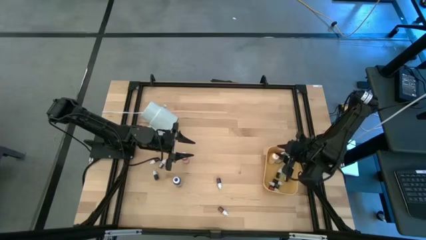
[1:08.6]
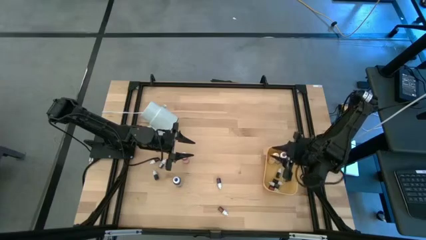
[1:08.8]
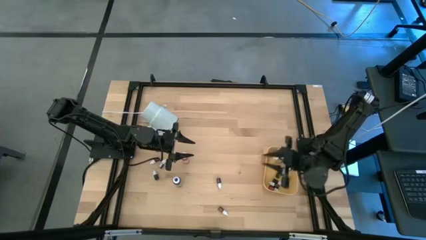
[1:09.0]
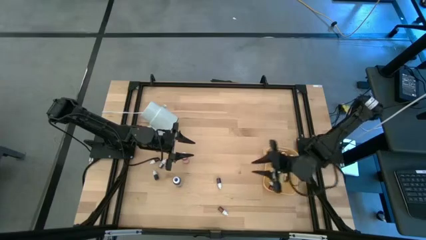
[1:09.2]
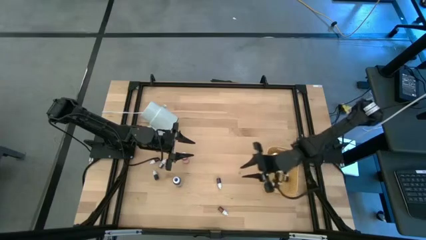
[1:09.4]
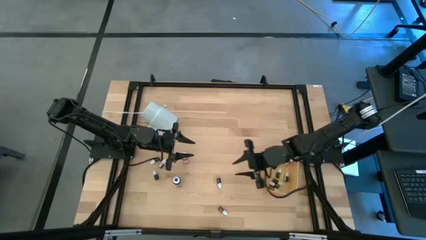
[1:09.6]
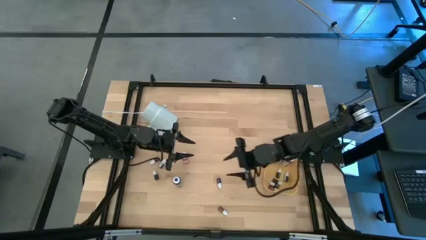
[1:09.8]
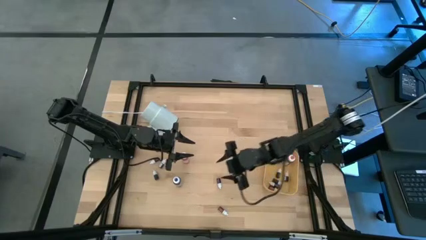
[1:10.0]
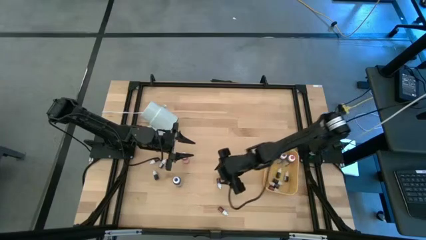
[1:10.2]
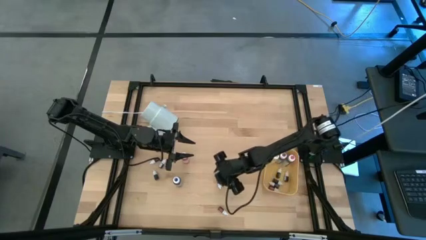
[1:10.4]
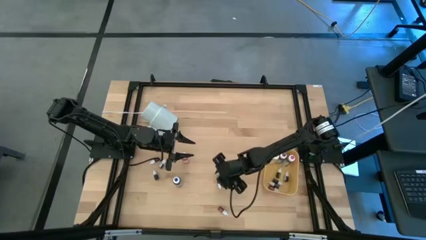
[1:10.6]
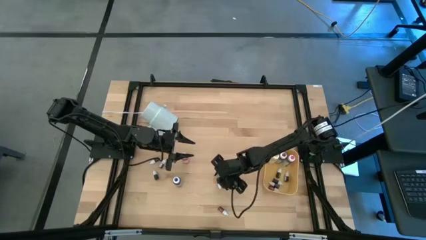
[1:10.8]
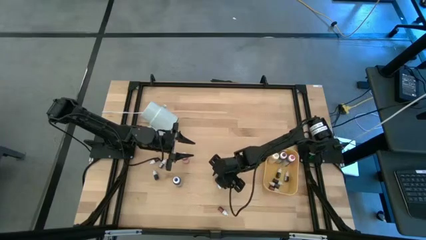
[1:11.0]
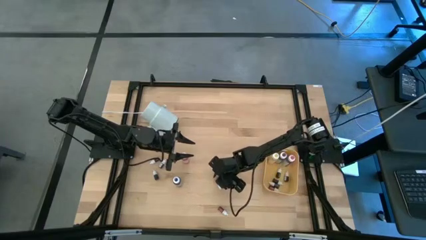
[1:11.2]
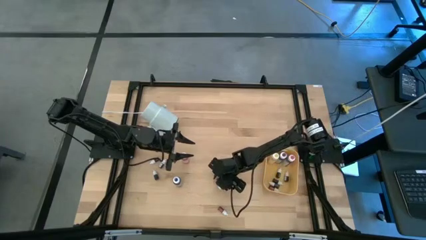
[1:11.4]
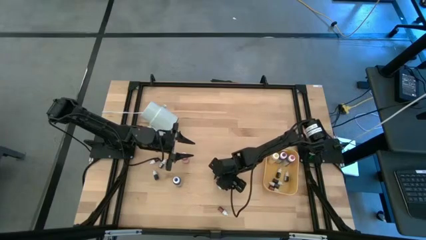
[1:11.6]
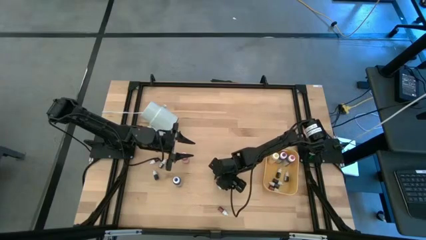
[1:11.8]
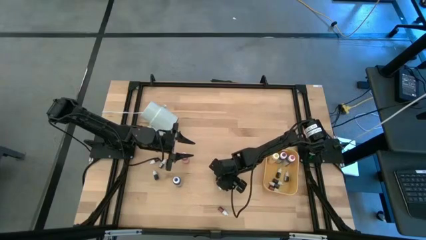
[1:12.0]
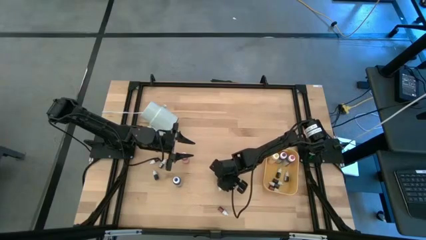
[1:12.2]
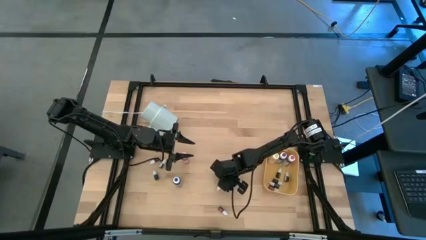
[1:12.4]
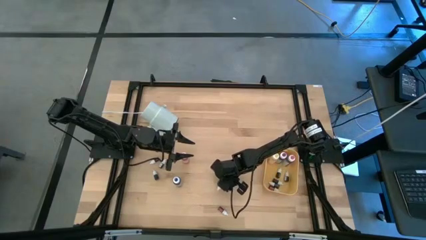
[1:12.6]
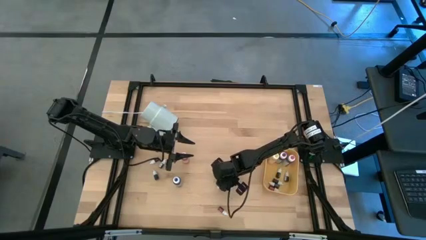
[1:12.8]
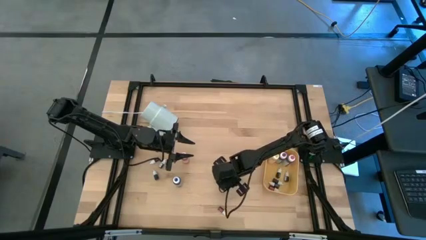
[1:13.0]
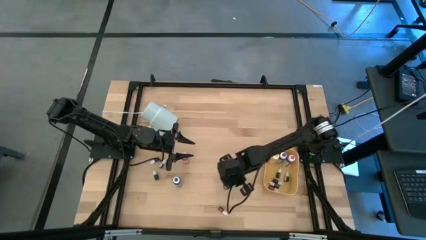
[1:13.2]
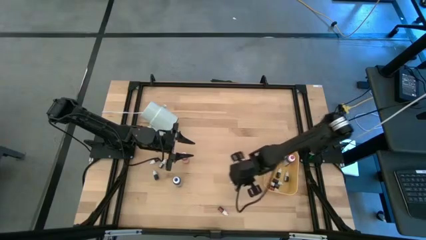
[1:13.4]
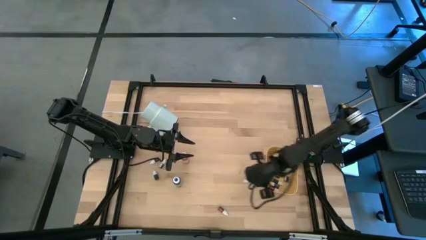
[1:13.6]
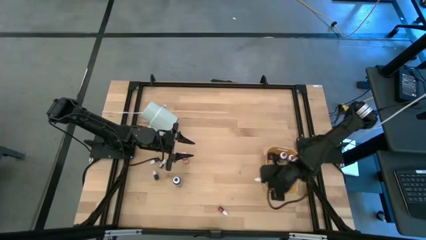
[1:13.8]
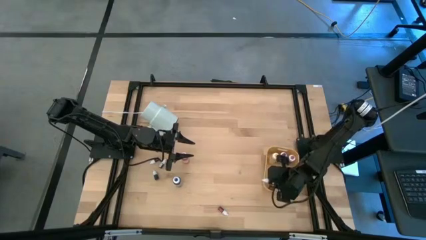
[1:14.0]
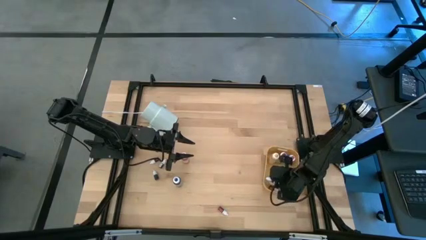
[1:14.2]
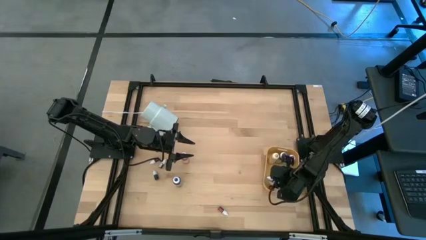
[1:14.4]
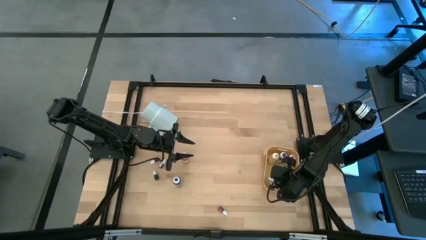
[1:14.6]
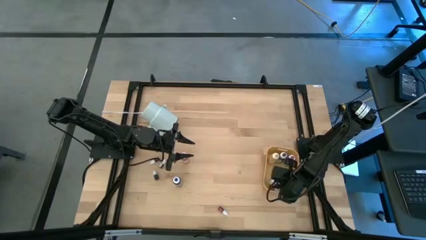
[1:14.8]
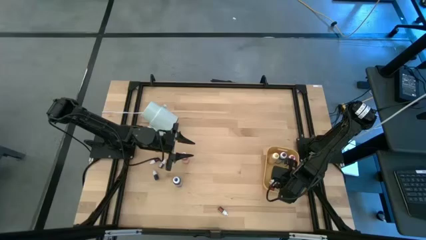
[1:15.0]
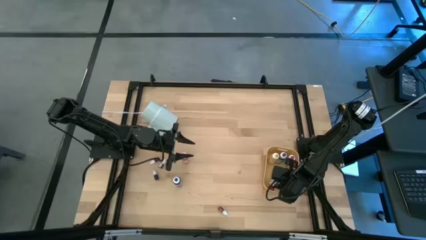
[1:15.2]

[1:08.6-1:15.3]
Task: Pick & Place food coloring
Put the small purple food coloring bottle into the yellow bin

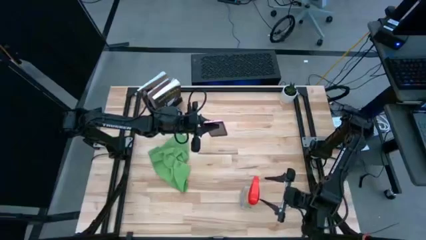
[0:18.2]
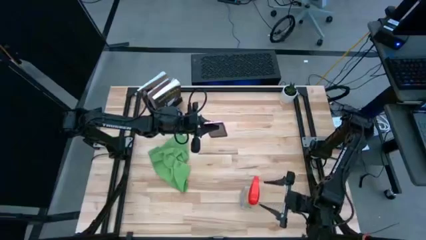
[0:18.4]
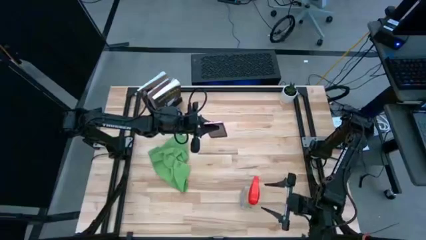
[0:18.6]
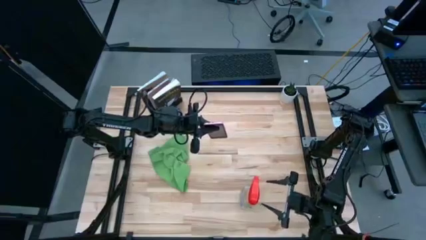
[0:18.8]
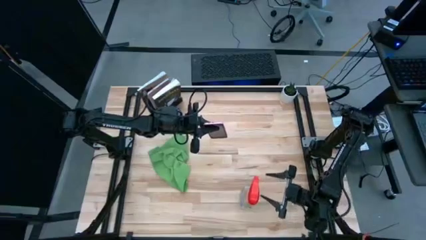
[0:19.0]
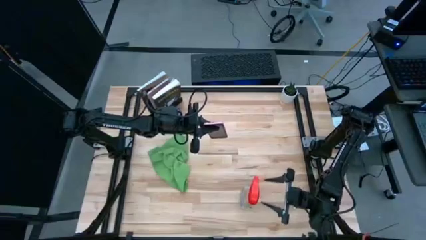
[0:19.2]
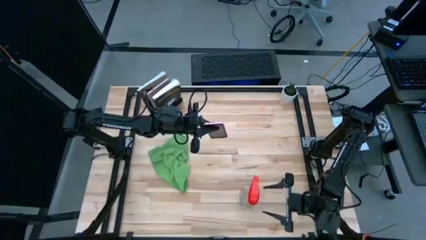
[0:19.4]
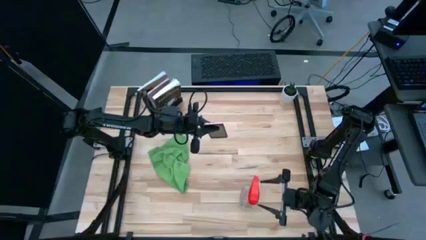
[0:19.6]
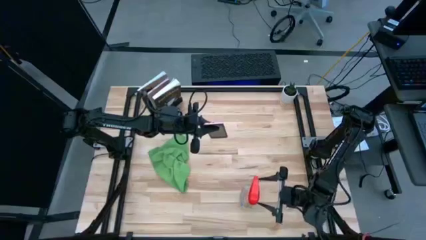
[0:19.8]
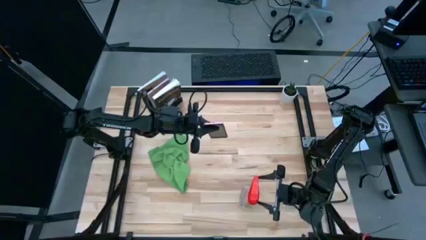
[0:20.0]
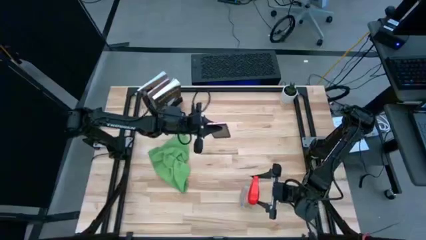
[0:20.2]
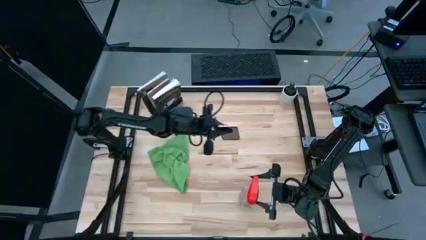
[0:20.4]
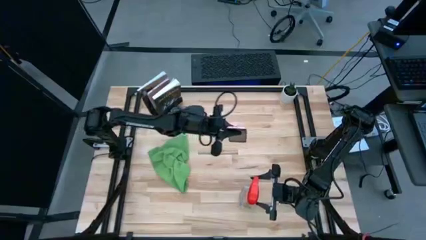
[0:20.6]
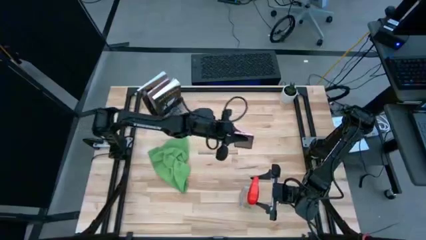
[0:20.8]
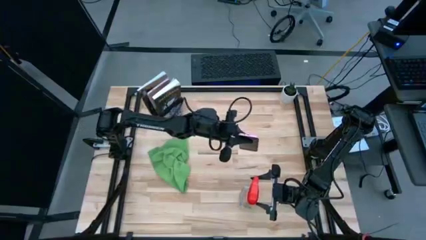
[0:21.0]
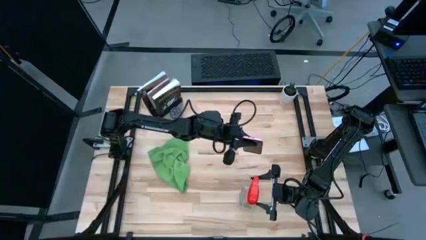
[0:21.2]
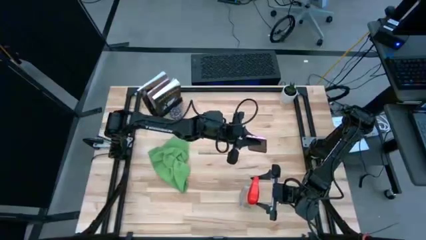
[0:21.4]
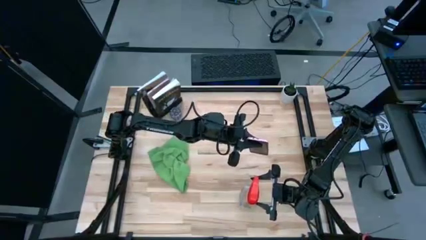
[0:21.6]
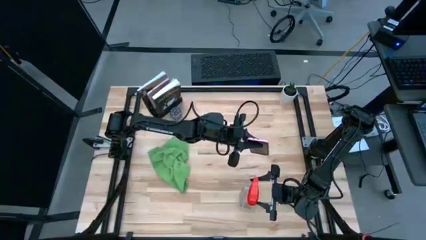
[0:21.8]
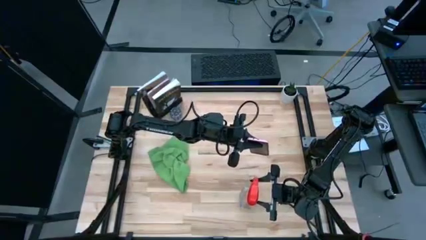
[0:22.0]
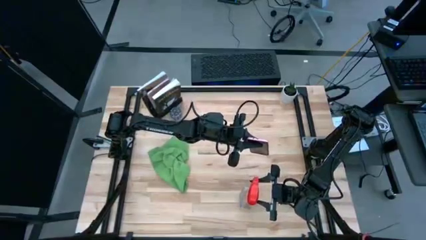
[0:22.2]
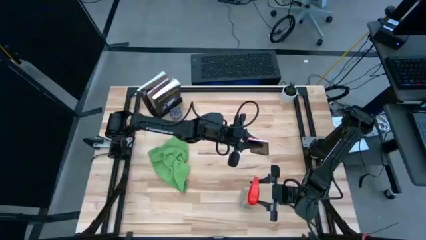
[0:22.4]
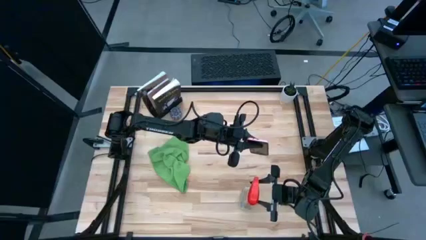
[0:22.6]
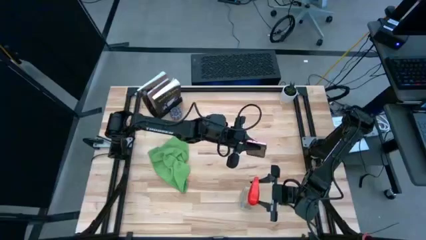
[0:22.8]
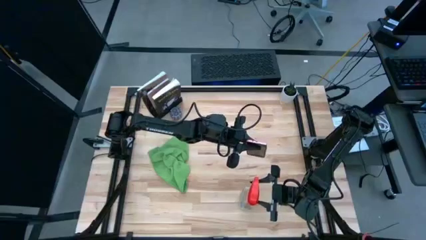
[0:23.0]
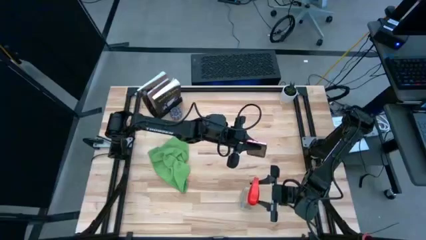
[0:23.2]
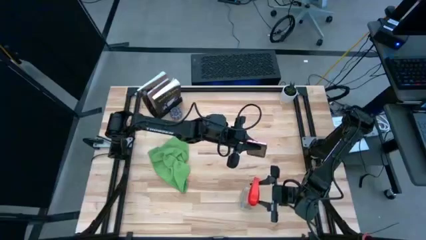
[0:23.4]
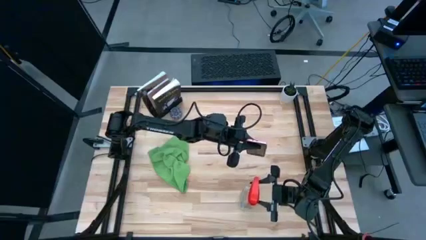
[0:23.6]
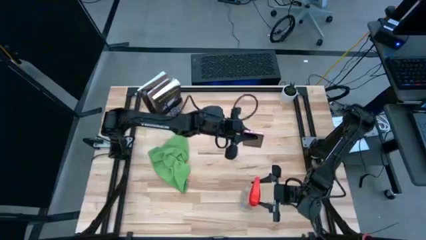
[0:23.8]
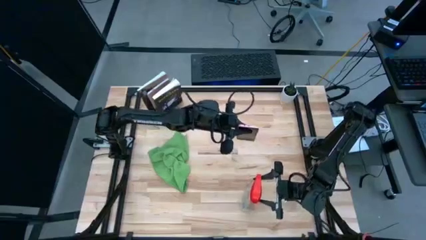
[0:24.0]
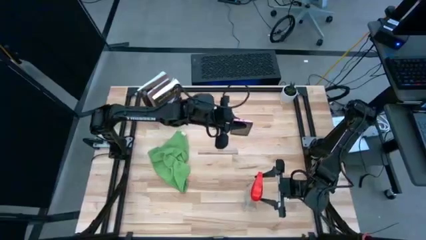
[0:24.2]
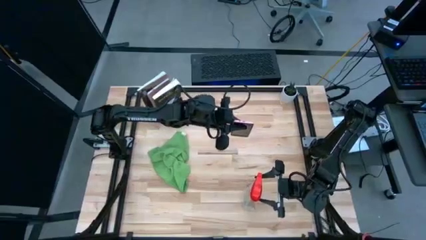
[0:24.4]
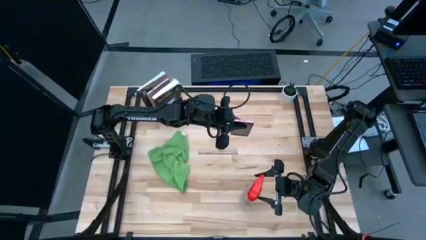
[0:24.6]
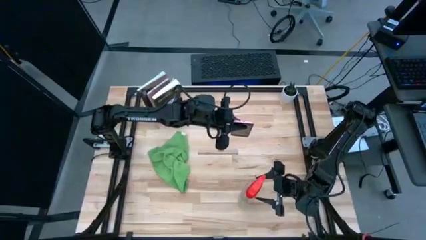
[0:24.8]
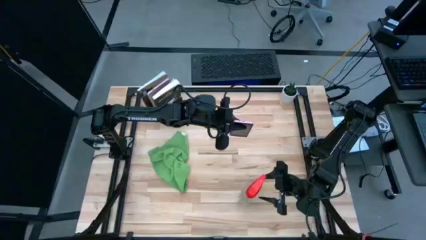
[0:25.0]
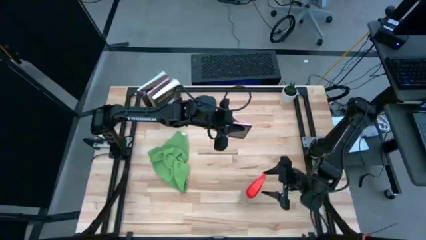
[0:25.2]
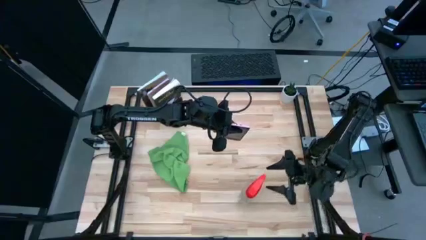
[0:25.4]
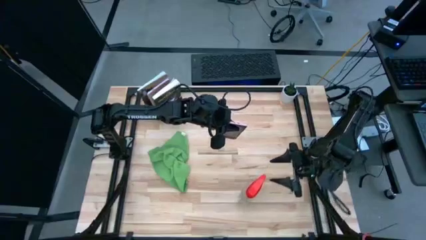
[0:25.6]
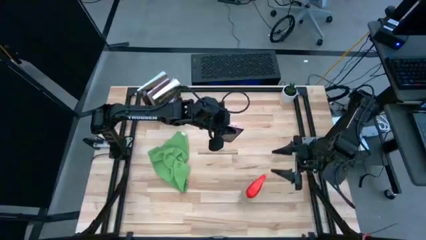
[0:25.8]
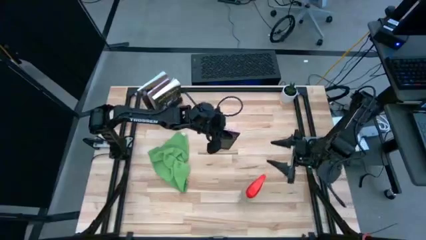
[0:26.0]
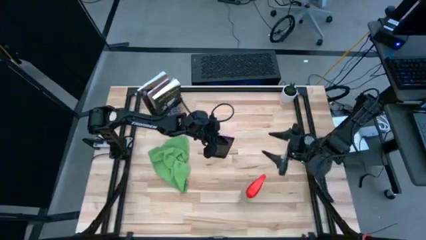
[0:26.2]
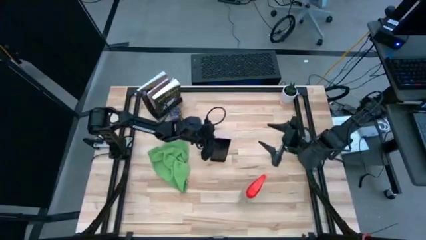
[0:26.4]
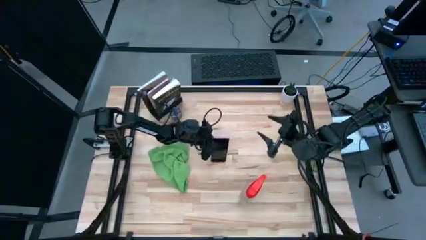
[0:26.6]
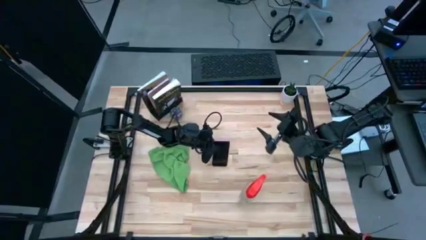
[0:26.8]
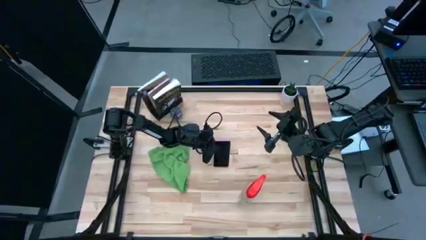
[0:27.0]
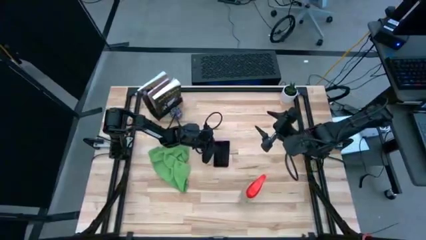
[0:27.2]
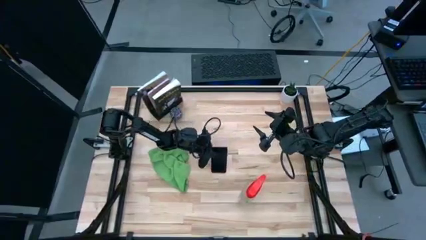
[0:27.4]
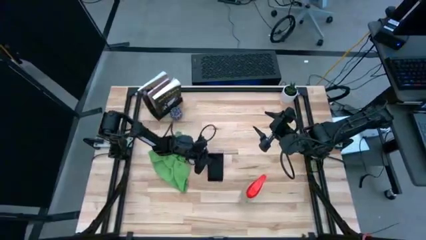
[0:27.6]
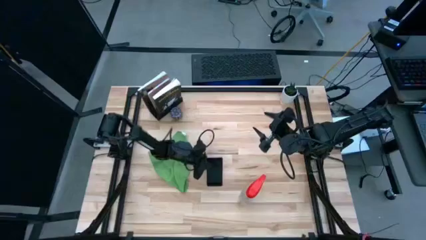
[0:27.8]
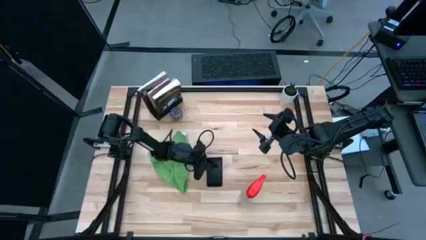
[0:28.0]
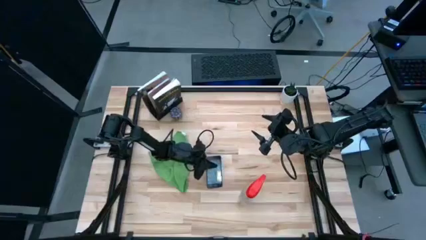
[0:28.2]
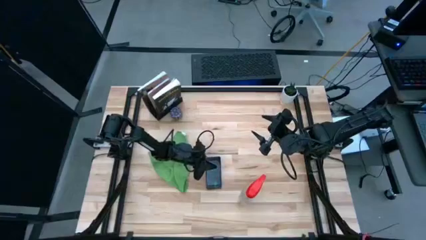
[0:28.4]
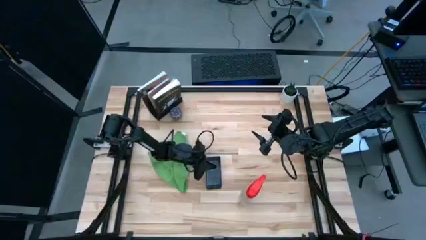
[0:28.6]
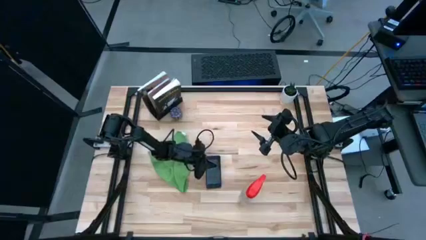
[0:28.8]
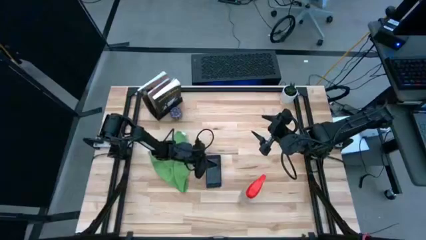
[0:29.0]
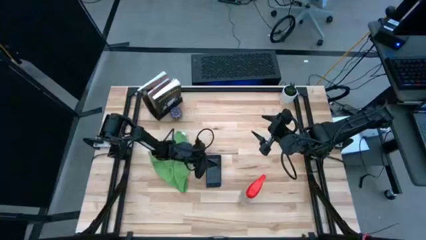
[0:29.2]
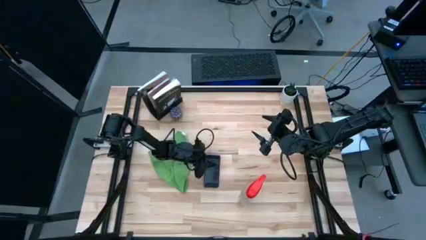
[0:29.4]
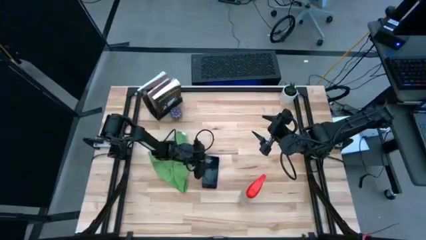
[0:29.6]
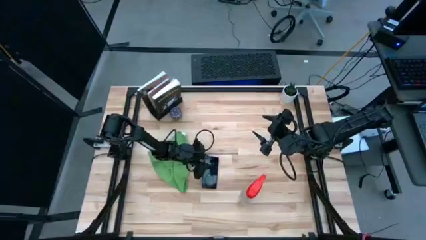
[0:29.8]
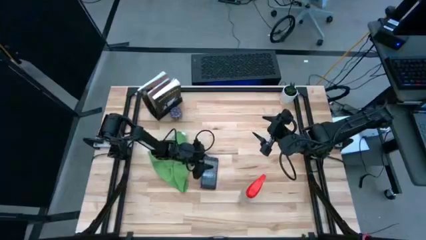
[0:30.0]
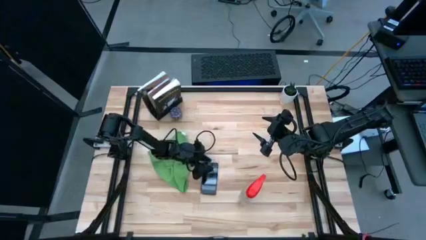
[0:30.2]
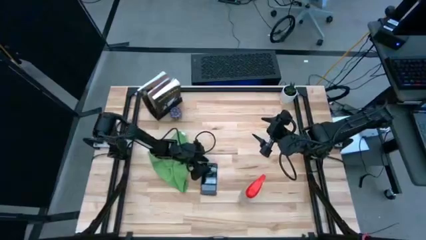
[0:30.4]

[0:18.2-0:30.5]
Task: Apply microfiber cloth
Spray the front of the pink cellphone with the red spray bottle
